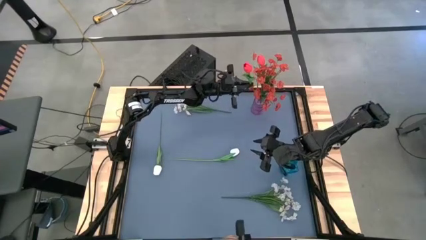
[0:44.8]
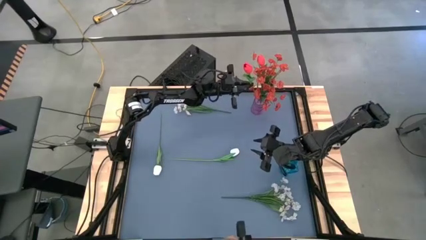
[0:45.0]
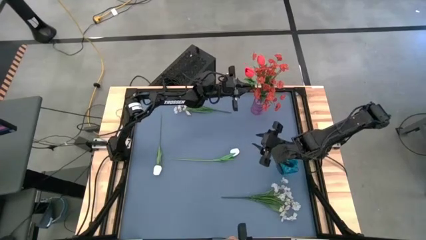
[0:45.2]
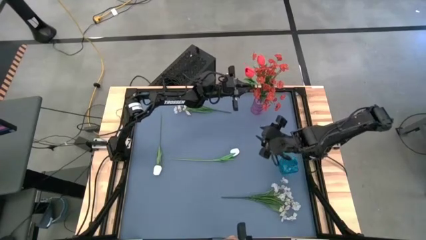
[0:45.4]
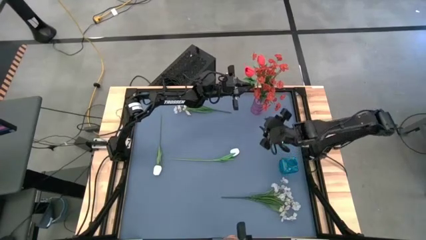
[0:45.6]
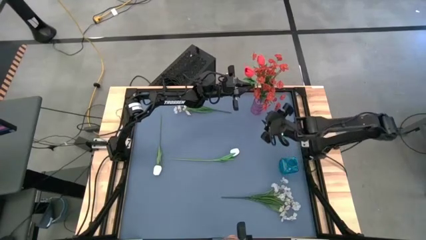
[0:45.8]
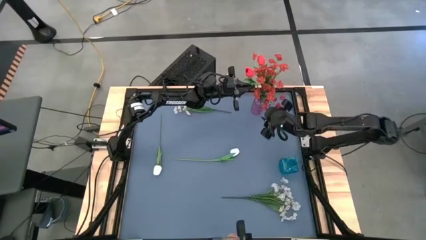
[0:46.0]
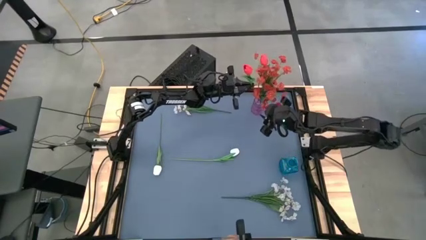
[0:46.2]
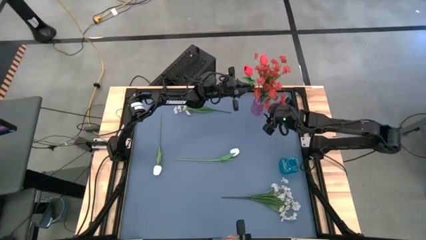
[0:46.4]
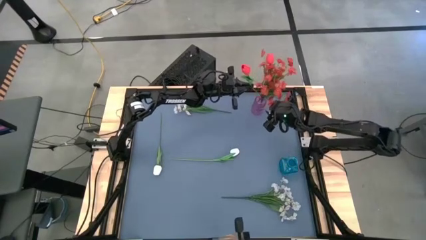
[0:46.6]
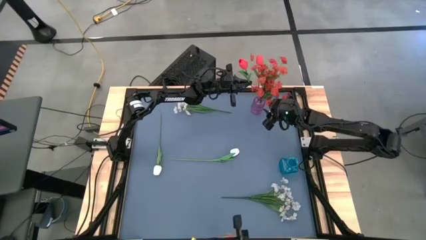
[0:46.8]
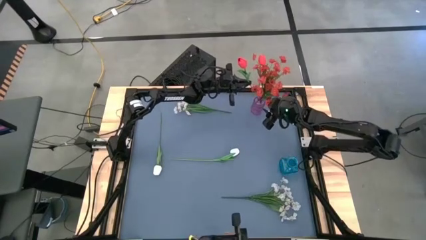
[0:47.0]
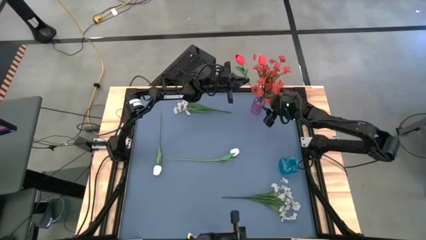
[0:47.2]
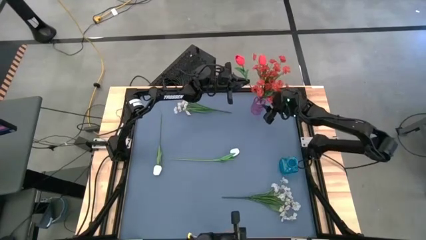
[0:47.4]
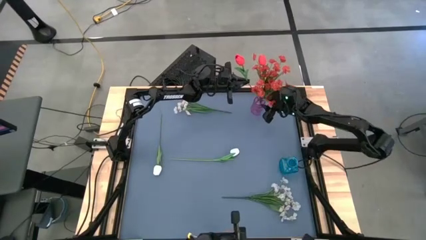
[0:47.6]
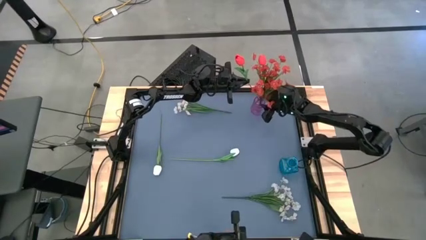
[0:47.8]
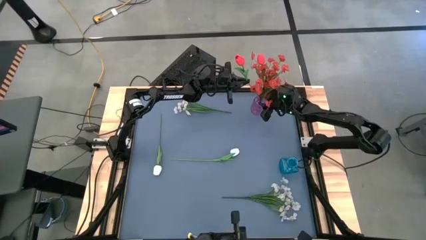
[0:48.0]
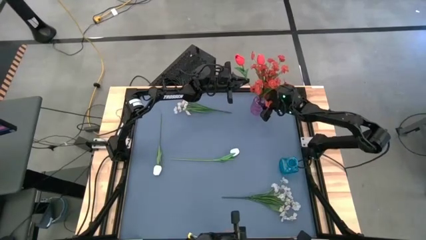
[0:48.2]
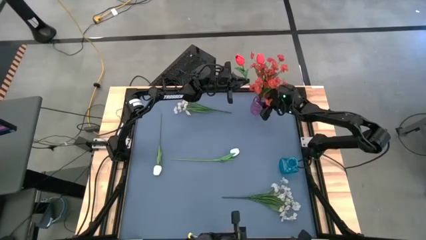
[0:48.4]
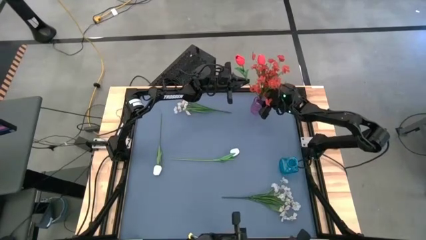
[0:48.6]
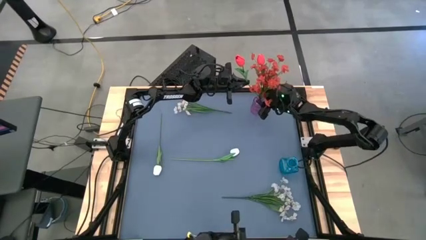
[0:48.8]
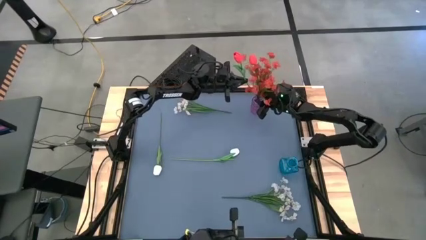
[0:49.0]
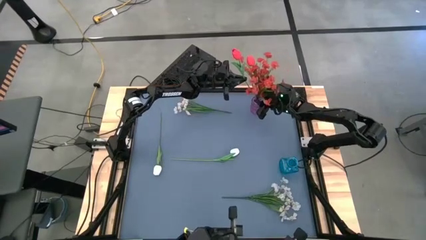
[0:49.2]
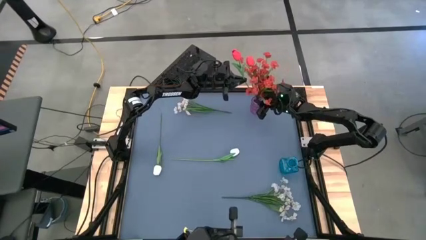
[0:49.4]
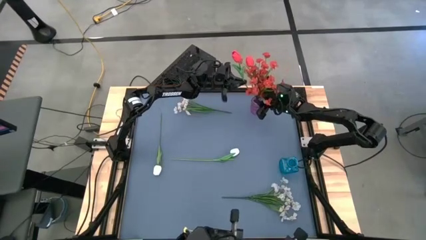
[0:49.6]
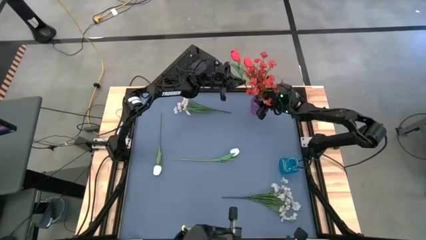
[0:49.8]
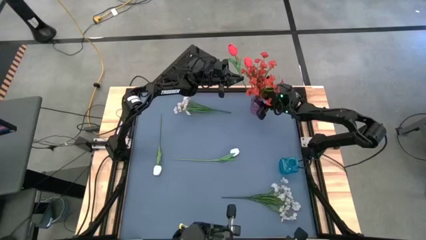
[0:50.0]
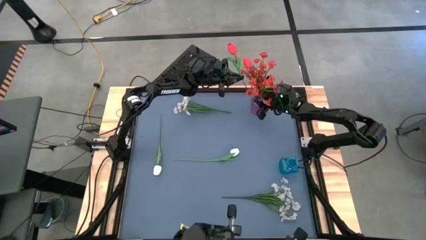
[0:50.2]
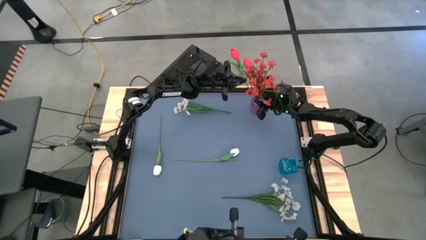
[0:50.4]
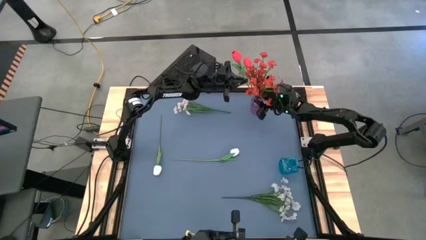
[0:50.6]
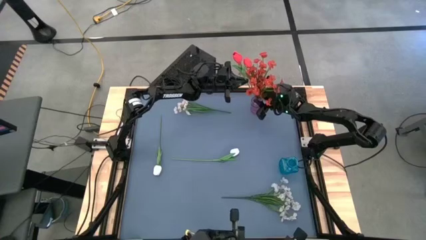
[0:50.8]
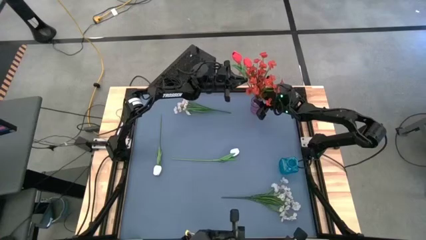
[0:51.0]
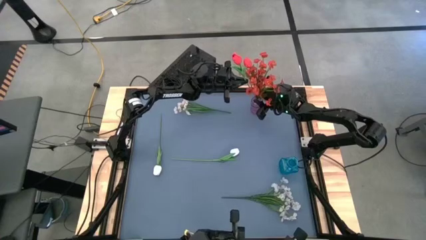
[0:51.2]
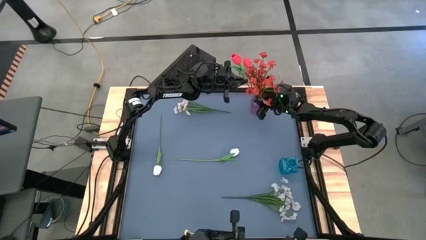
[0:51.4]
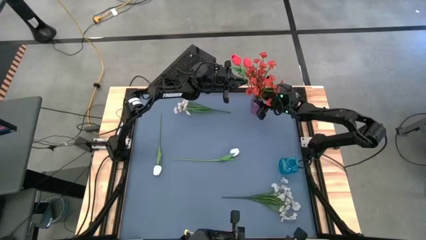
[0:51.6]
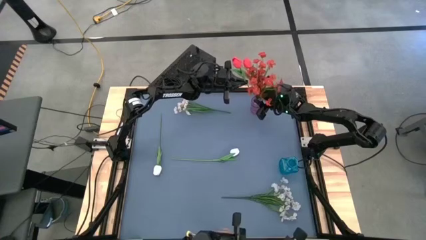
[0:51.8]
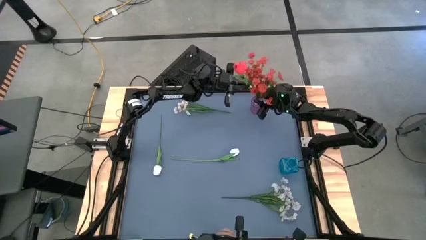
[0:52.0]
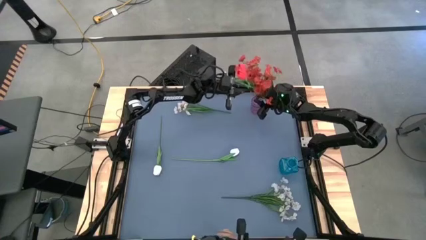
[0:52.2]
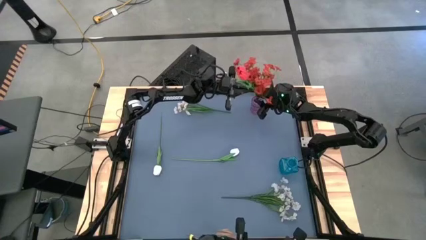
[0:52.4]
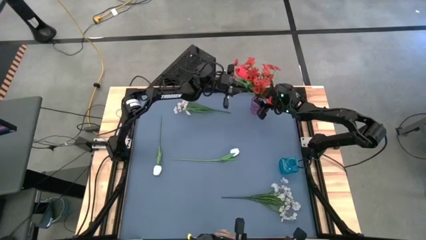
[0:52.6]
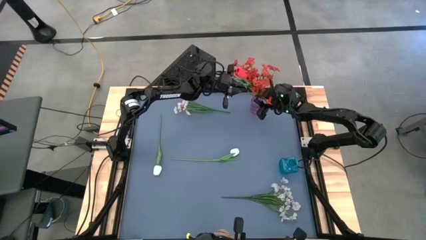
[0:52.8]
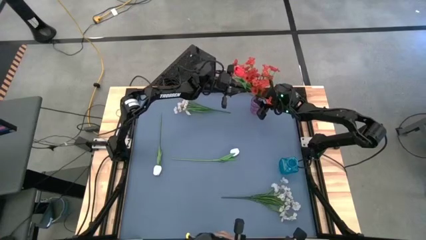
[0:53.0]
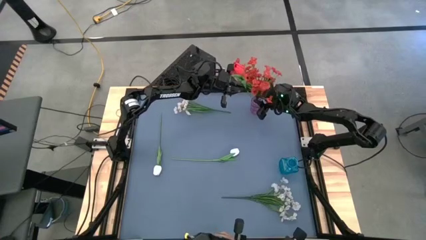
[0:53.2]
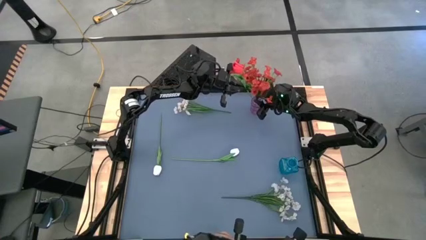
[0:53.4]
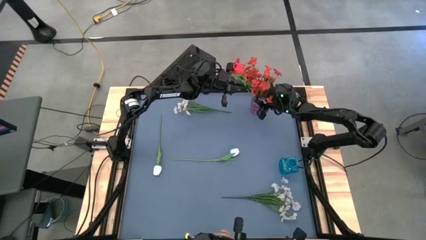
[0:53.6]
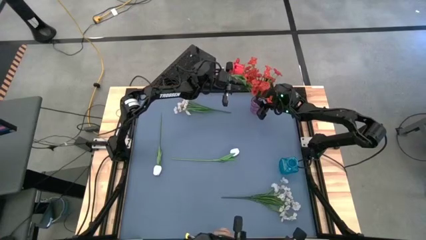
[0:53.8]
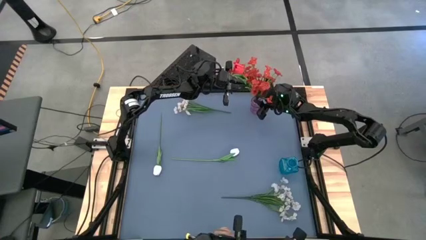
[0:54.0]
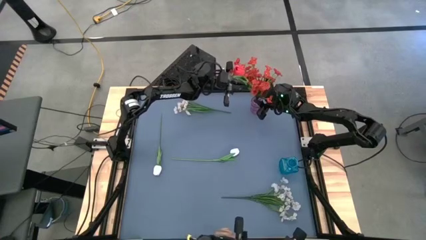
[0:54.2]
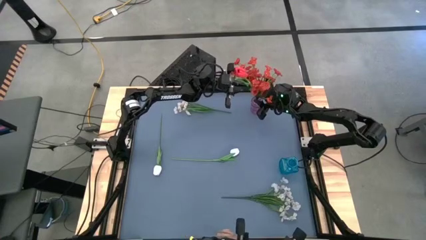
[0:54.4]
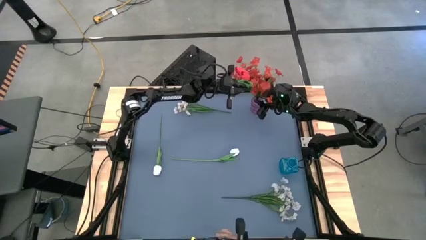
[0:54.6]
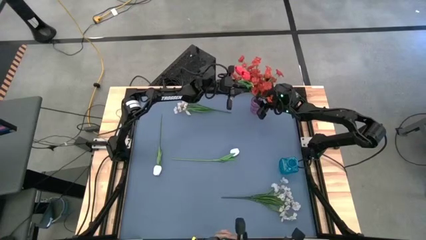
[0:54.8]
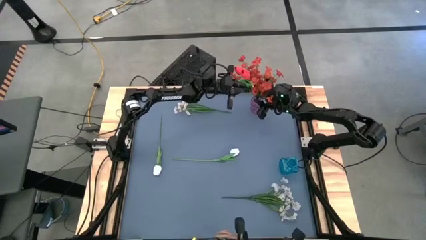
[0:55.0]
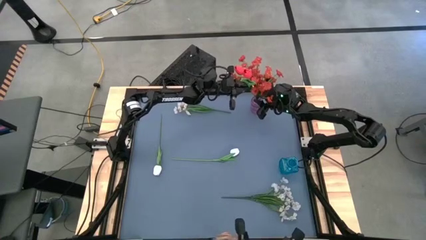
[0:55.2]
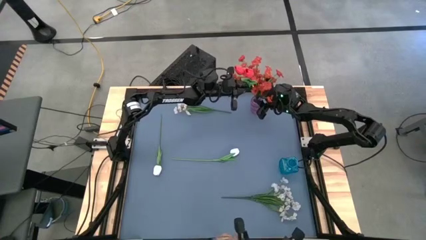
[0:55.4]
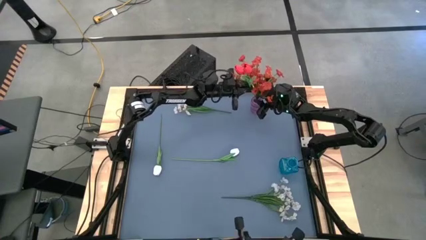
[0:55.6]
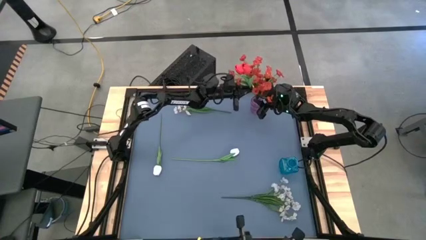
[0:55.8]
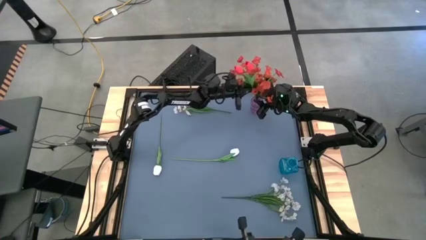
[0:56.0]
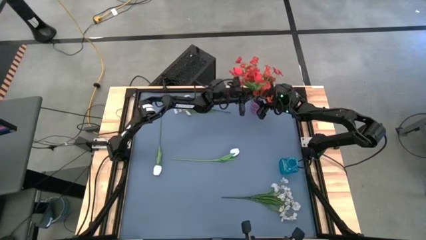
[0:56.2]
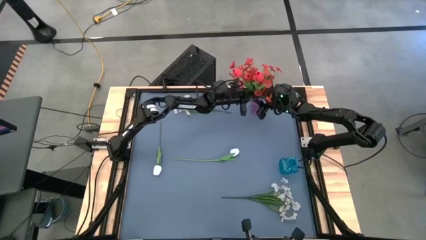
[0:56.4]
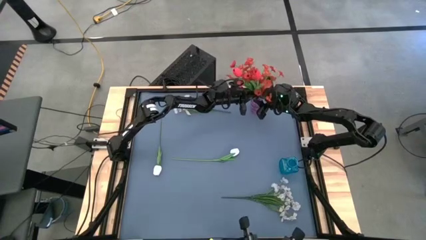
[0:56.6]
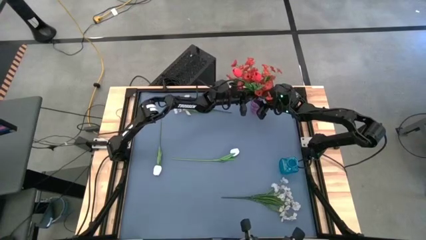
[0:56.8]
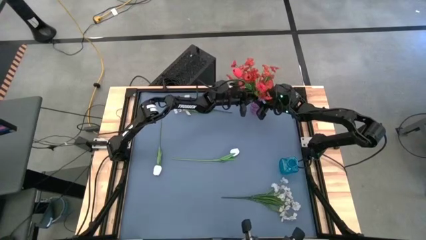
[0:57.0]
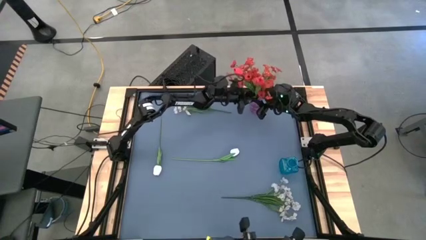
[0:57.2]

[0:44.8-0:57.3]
Task: Sort flowers into vase by color
Put the red tulip into the purple vase
